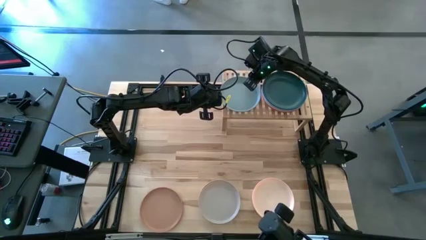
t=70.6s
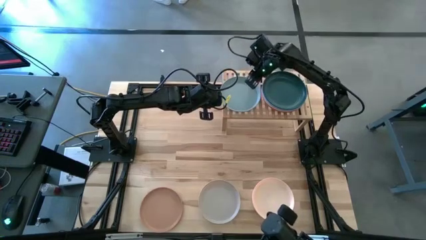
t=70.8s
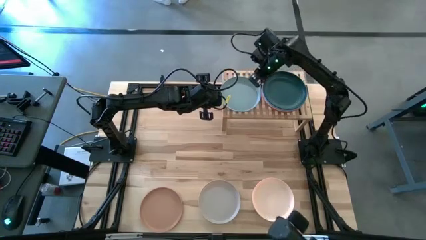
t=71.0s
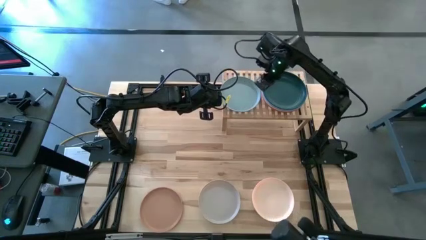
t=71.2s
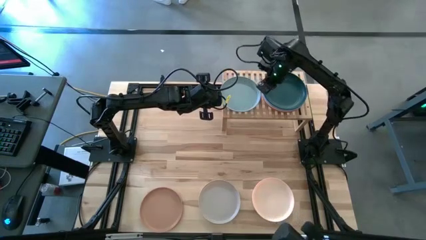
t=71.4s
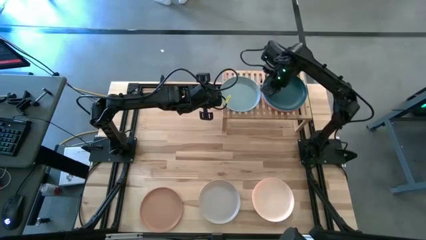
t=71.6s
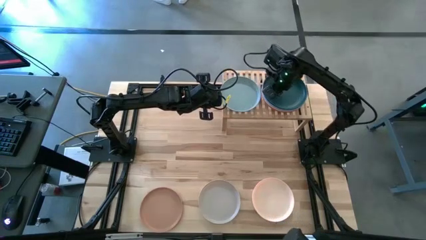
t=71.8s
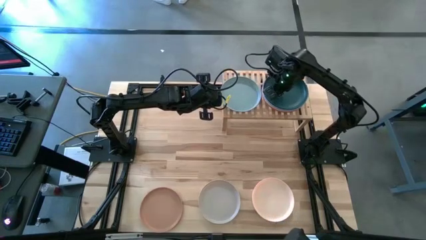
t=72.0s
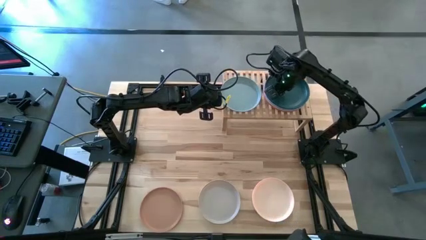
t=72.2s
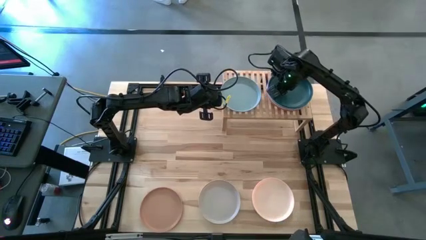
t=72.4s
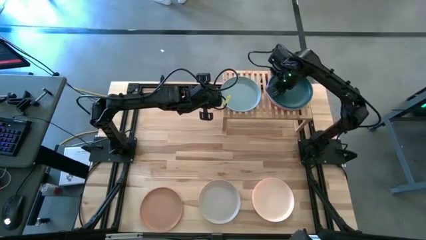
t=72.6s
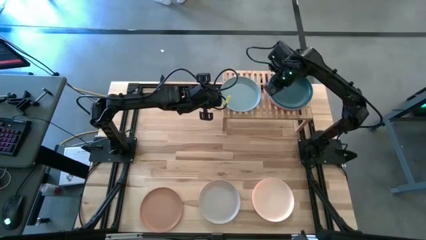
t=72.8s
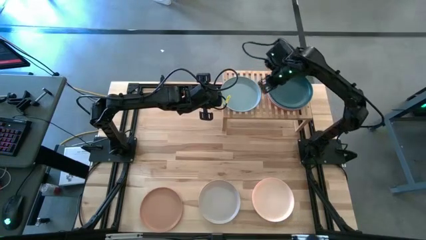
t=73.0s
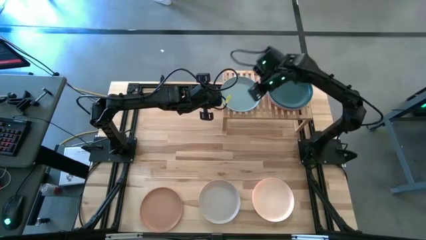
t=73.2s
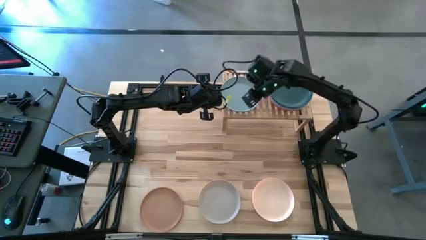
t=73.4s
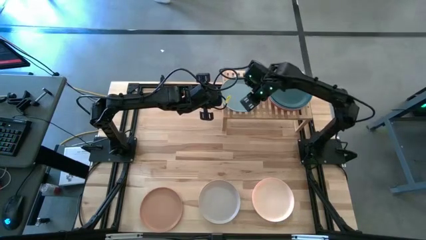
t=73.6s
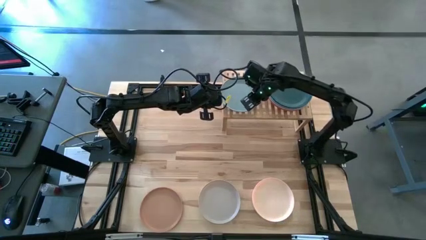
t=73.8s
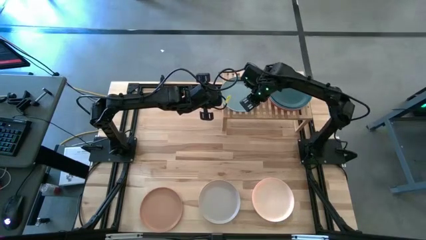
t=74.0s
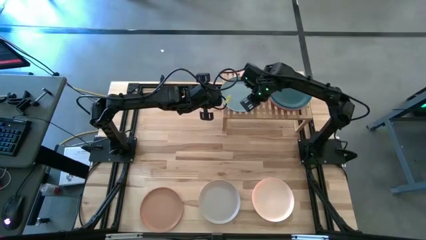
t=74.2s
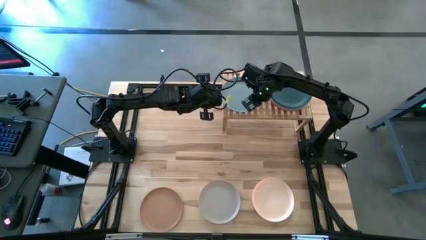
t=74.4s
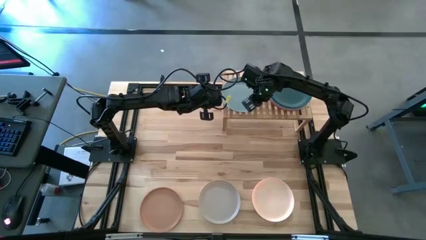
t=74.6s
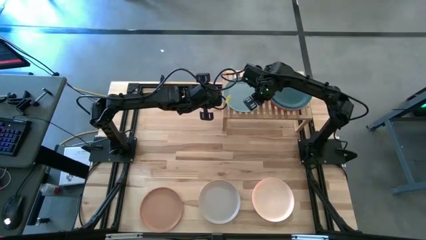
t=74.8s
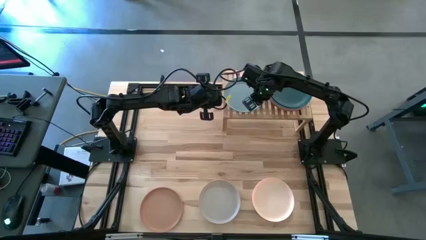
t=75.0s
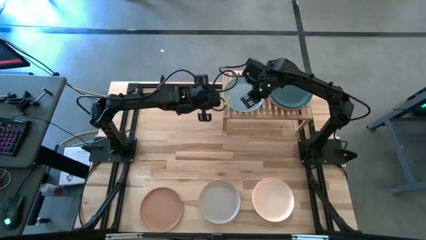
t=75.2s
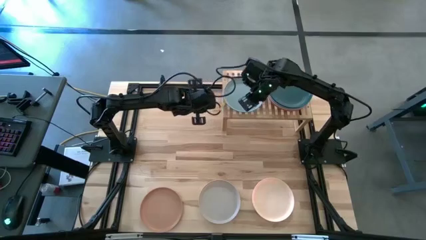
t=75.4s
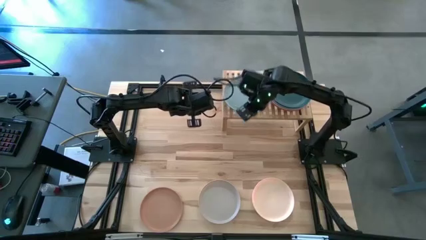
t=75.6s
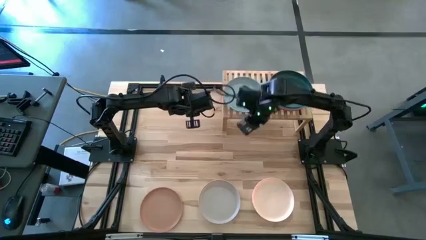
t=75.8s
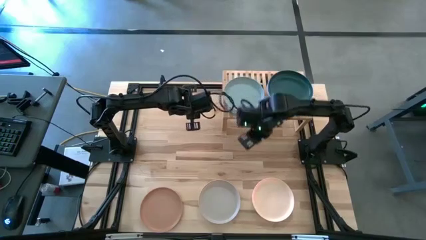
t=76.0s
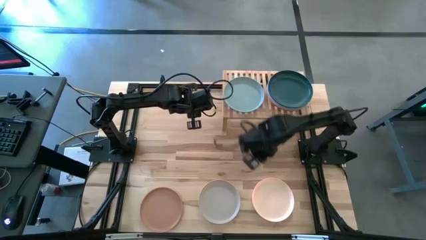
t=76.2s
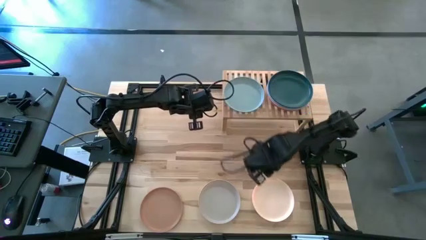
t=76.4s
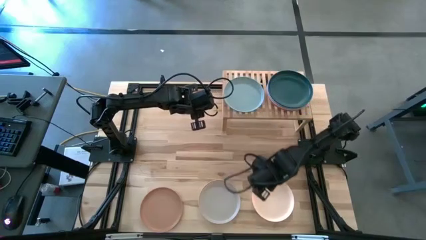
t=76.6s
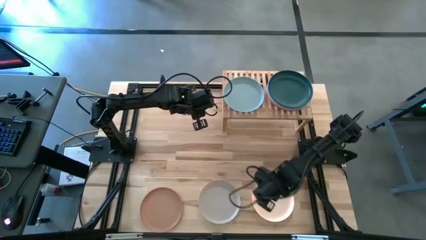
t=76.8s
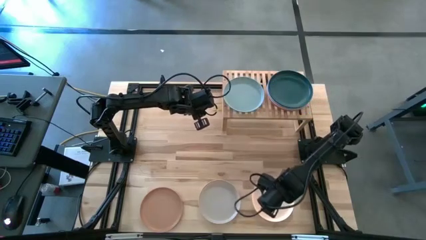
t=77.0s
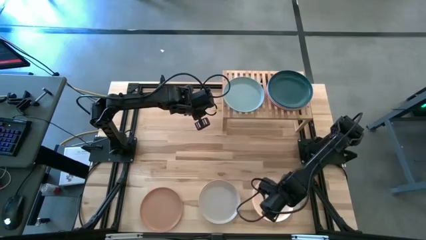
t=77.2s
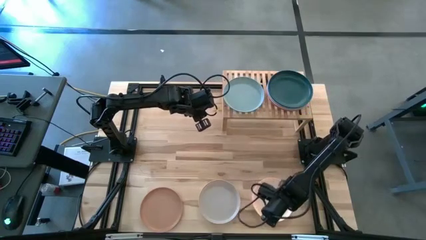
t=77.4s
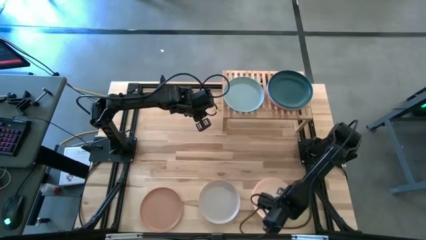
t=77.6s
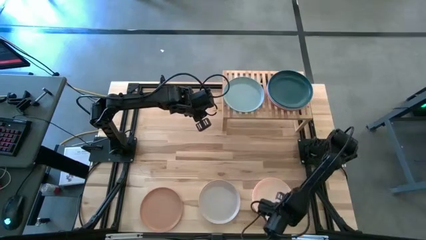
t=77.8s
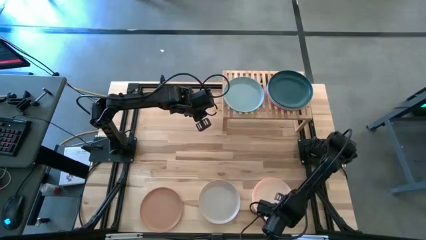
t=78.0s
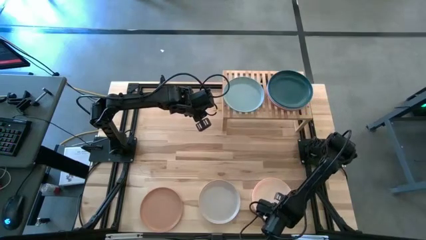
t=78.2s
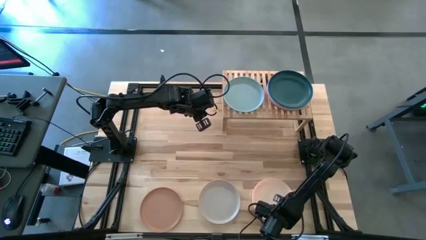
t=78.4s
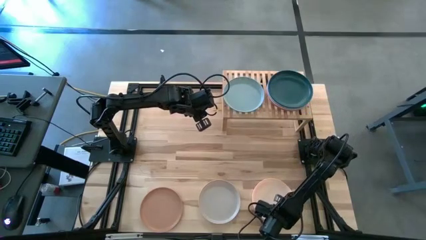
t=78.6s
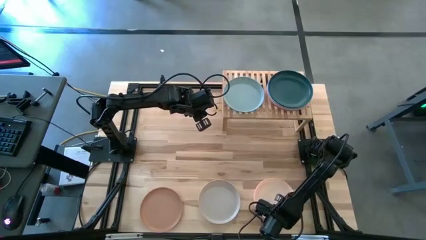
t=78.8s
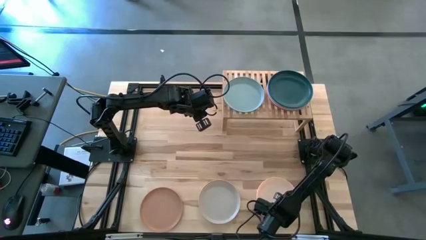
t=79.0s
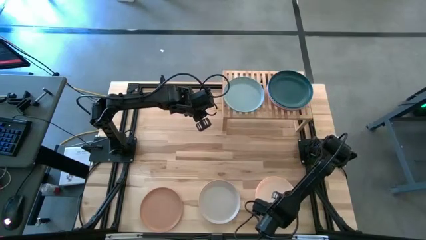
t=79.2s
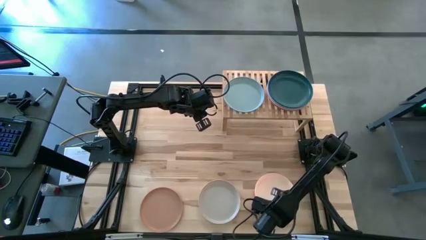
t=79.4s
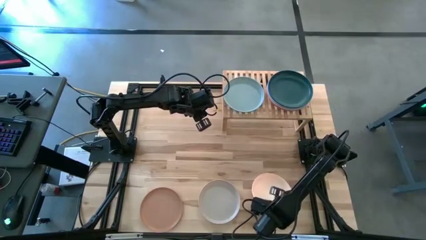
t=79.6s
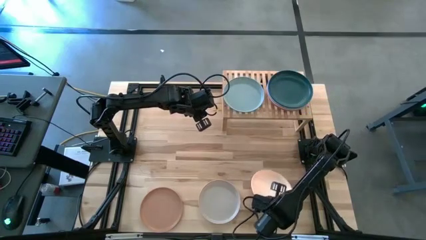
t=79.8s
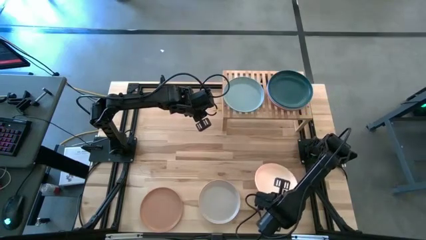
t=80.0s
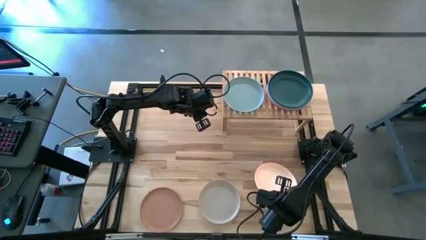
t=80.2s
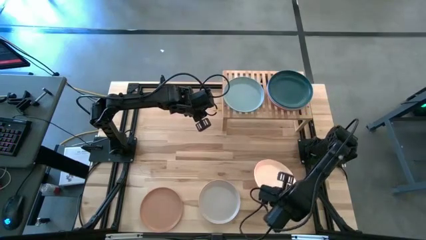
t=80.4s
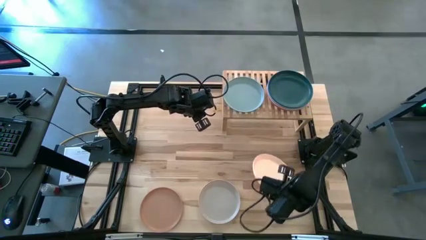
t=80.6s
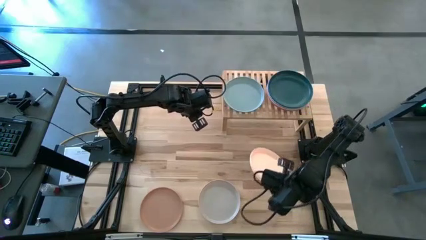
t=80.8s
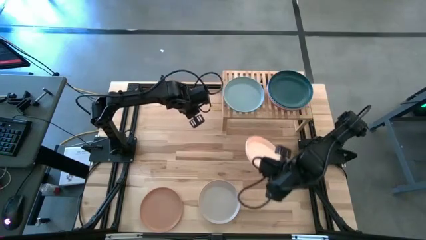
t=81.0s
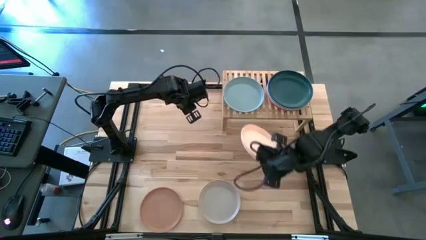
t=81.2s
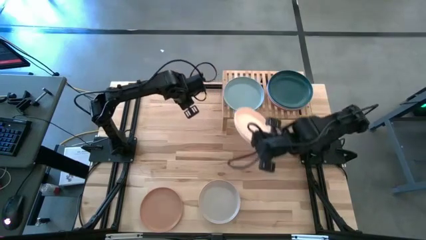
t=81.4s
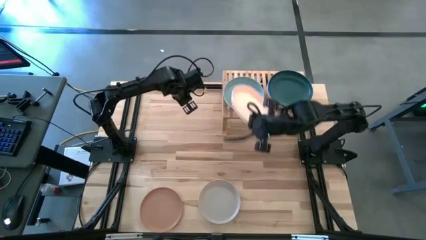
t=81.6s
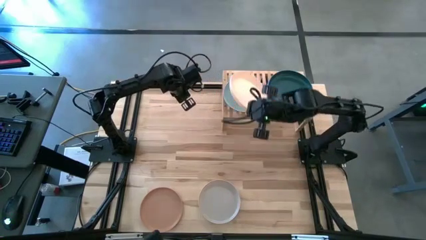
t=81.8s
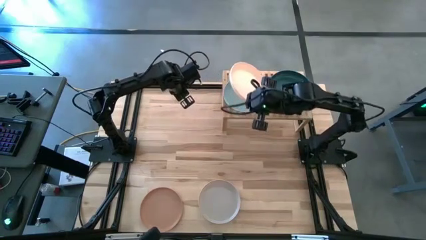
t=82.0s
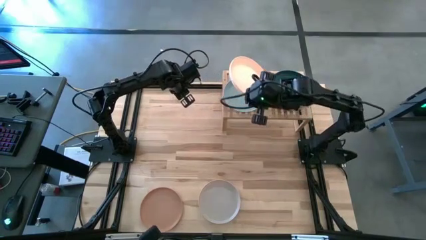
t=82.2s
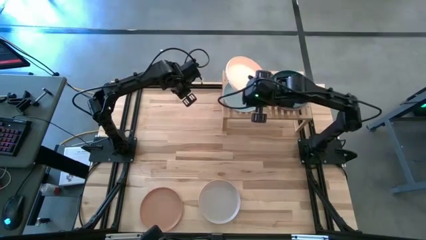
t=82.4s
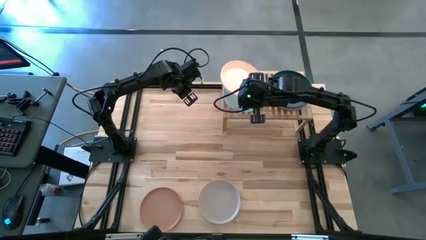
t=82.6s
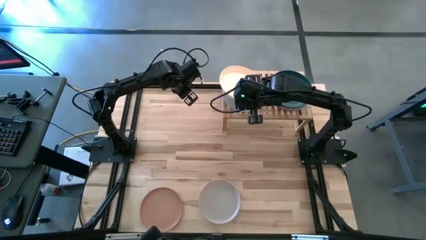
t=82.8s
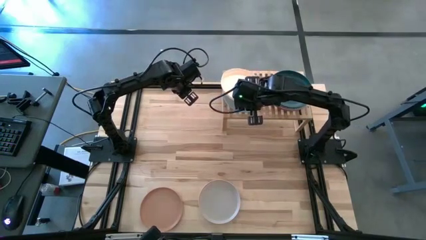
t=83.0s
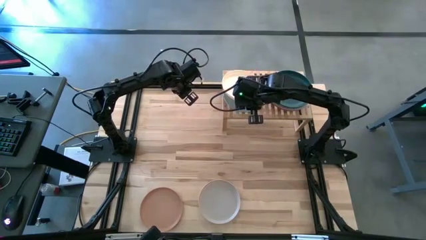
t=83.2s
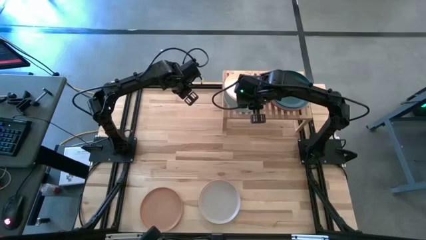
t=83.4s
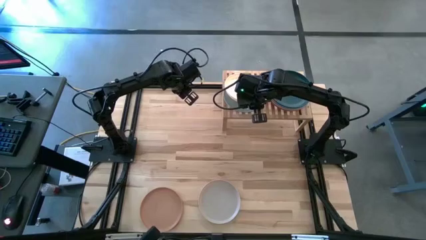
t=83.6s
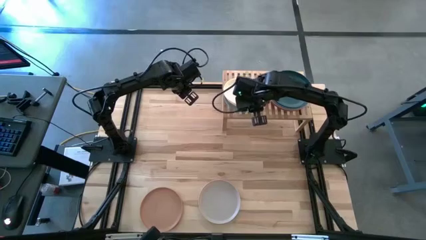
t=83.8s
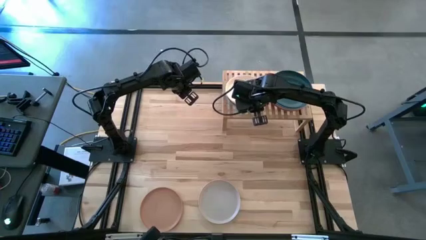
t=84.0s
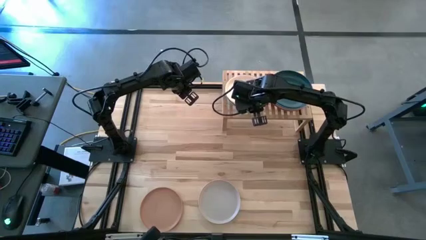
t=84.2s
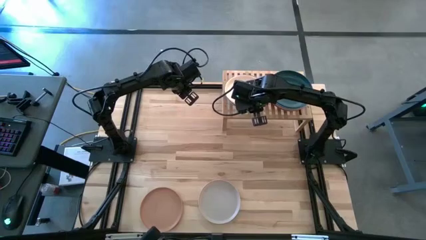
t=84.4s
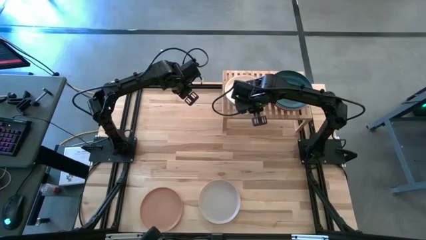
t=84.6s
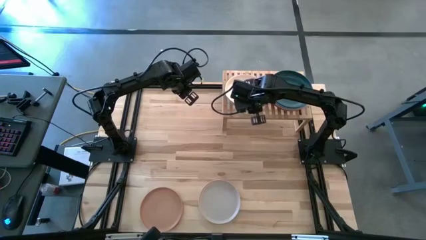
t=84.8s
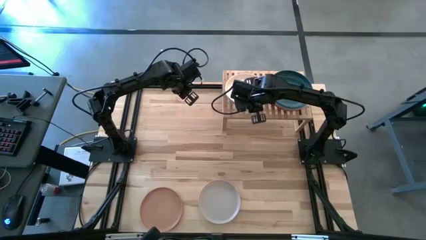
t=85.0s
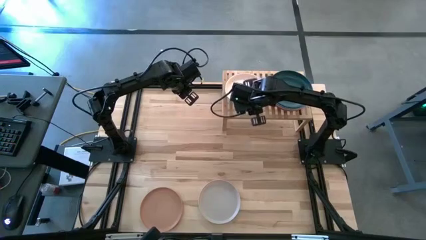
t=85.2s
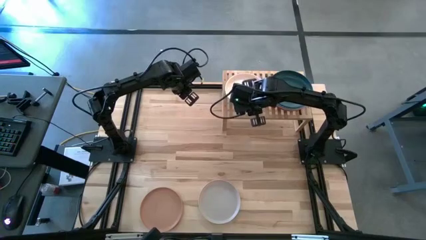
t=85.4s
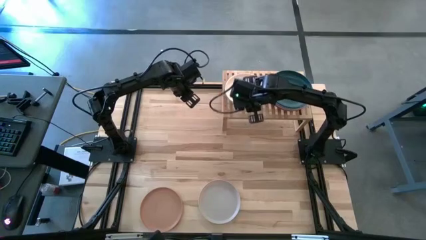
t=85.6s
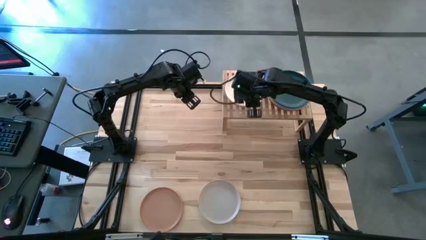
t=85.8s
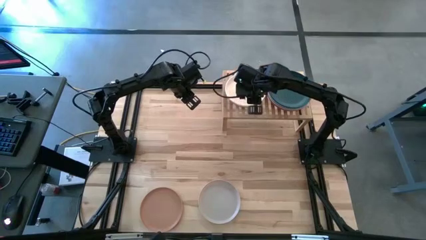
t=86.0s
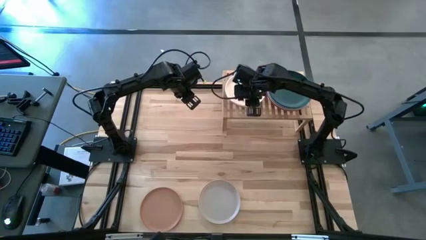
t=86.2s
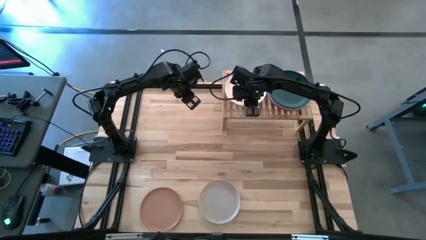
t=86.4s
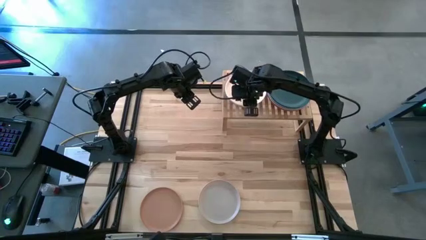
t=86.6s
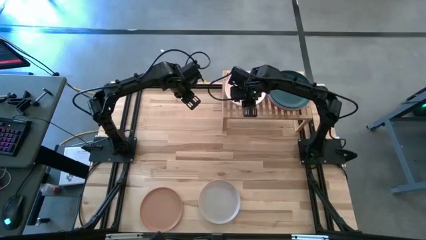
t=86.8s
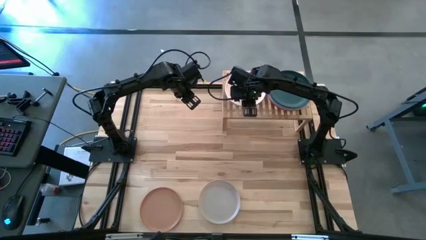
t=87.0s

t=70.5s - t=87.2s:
Task: Place and stack plates onto a shelf
Stack the light yellow plate on top of the light blue plate onto the shelf
